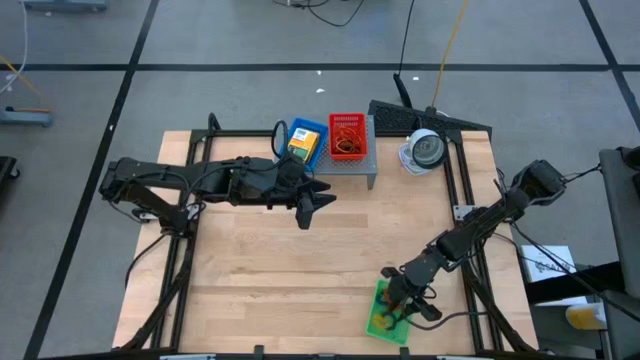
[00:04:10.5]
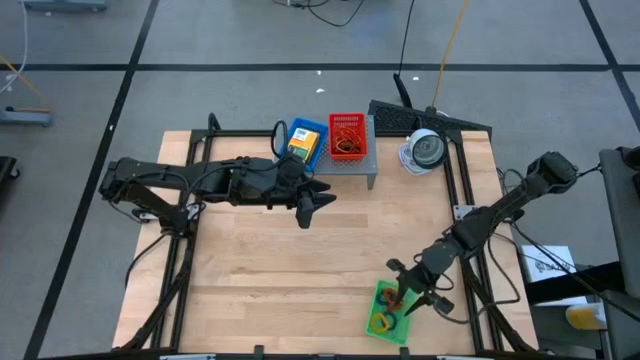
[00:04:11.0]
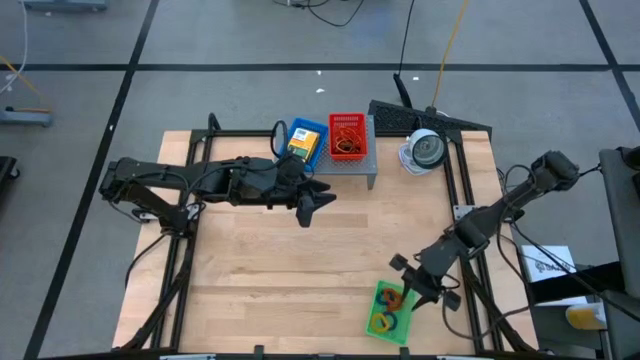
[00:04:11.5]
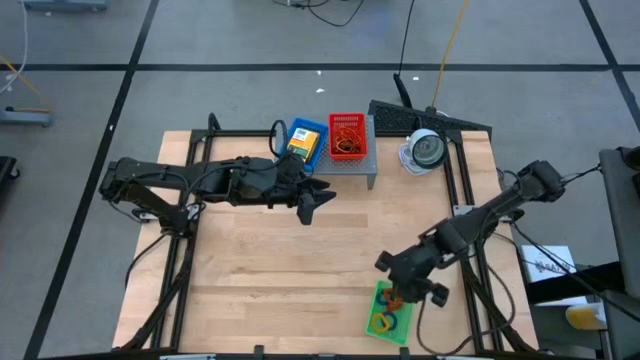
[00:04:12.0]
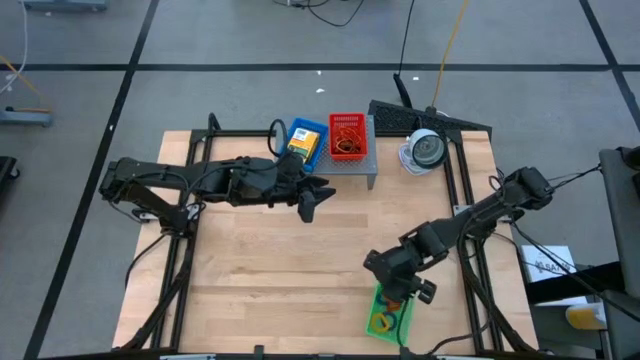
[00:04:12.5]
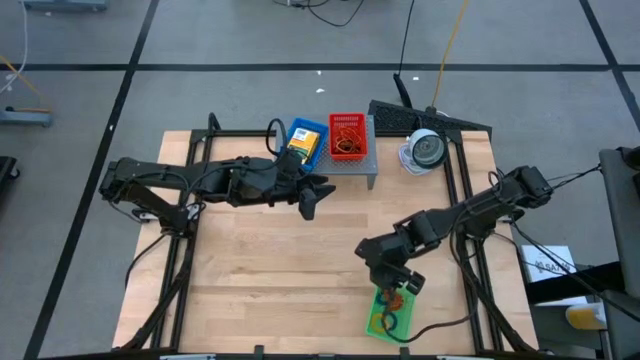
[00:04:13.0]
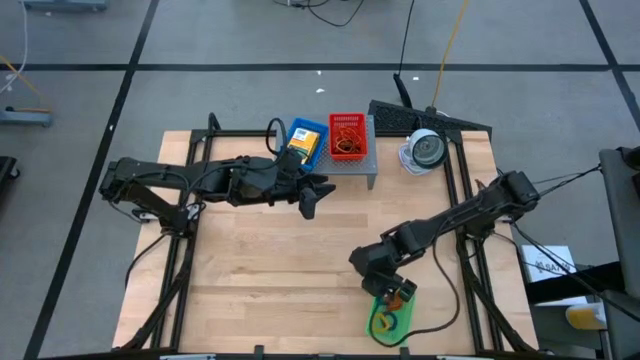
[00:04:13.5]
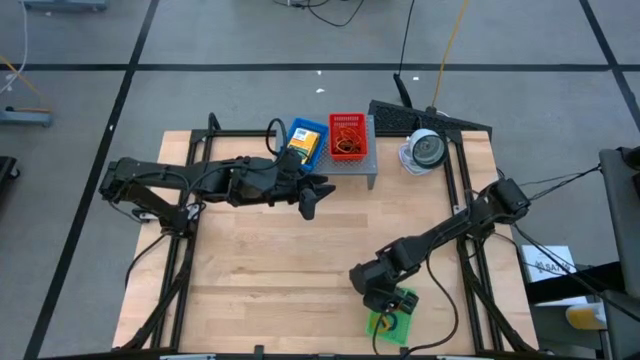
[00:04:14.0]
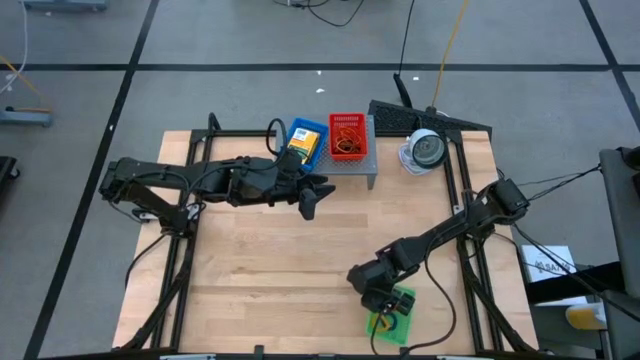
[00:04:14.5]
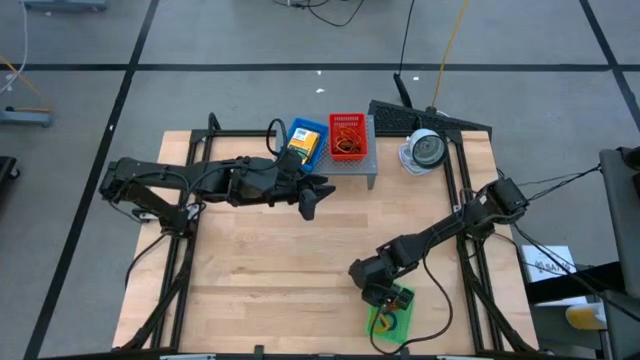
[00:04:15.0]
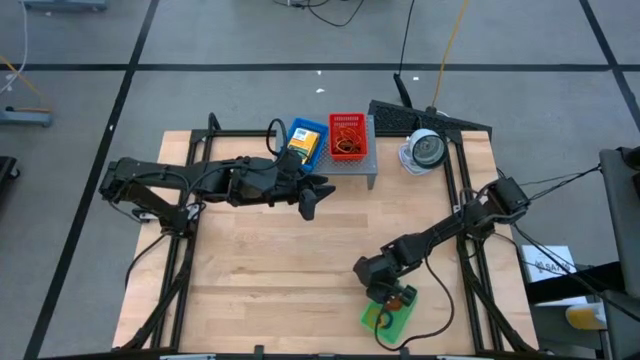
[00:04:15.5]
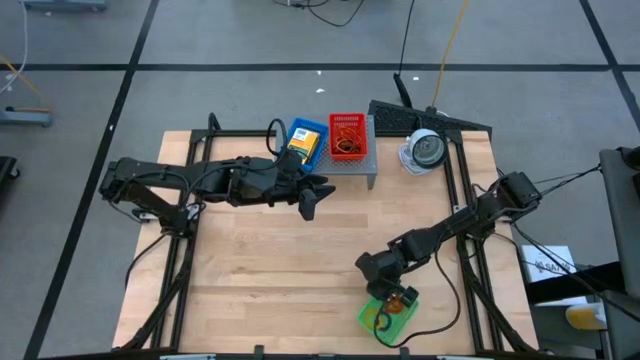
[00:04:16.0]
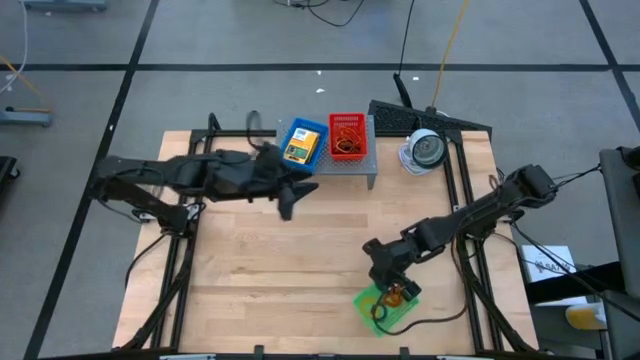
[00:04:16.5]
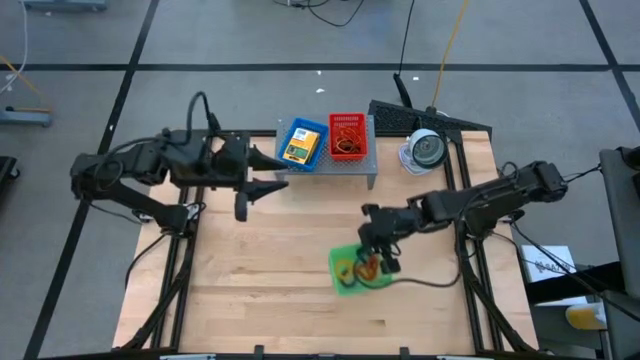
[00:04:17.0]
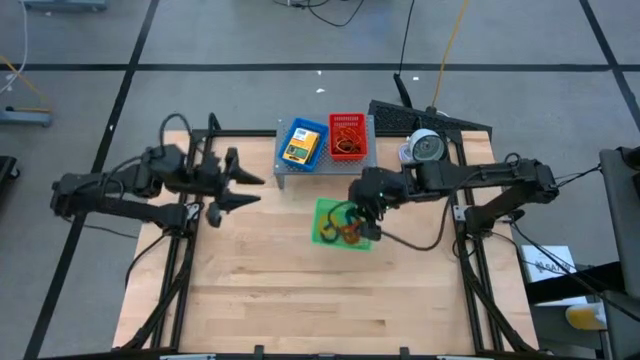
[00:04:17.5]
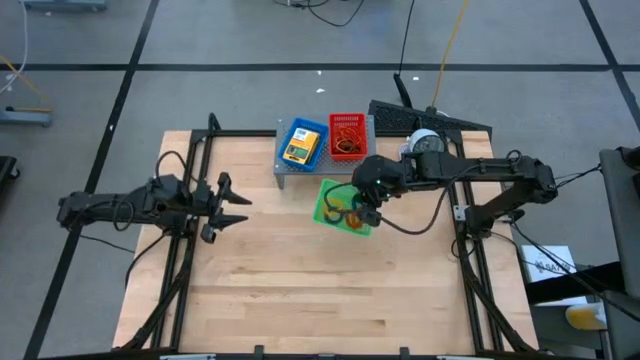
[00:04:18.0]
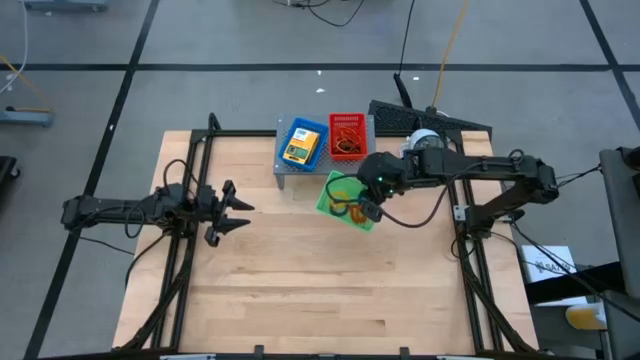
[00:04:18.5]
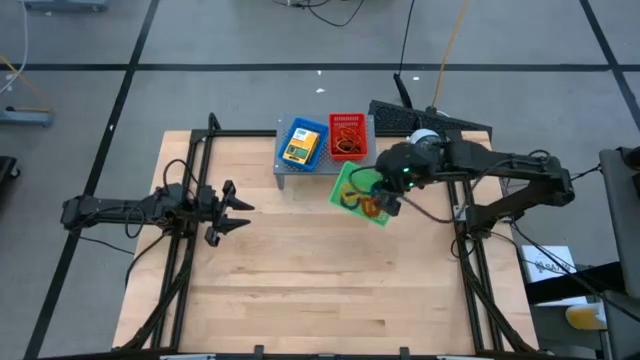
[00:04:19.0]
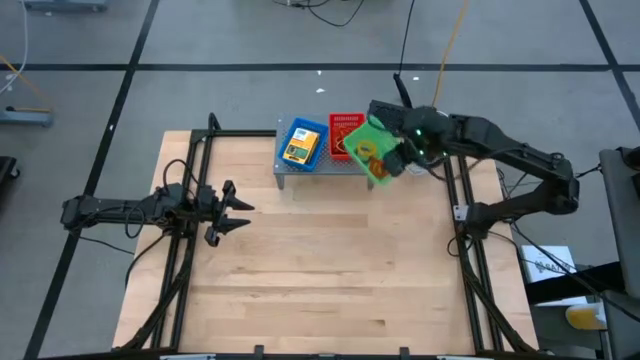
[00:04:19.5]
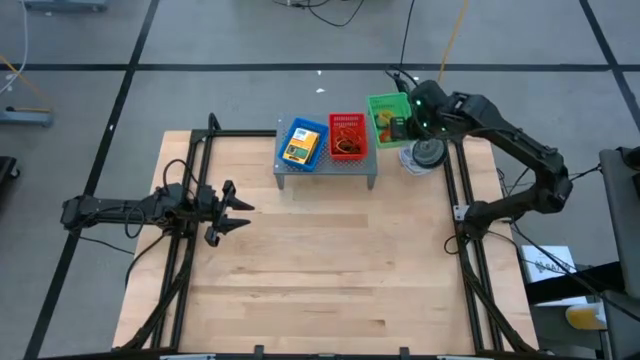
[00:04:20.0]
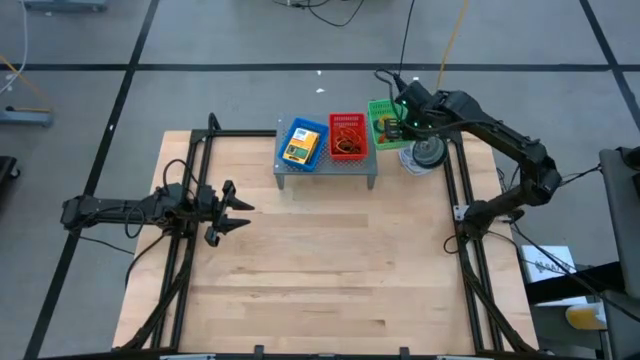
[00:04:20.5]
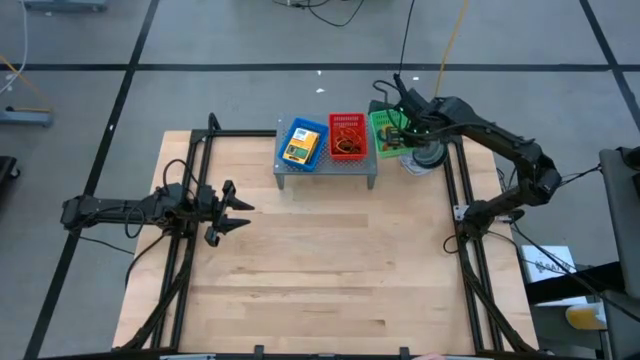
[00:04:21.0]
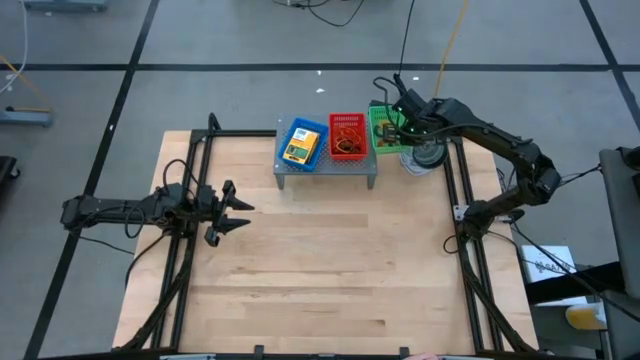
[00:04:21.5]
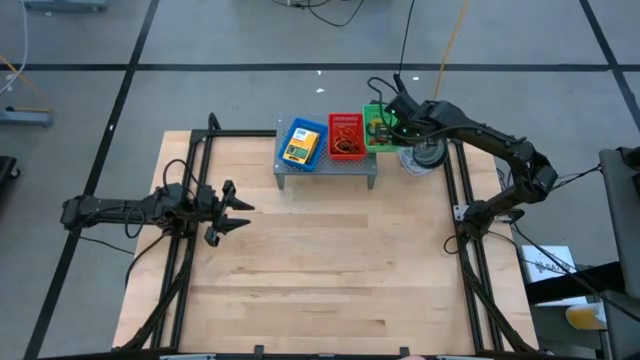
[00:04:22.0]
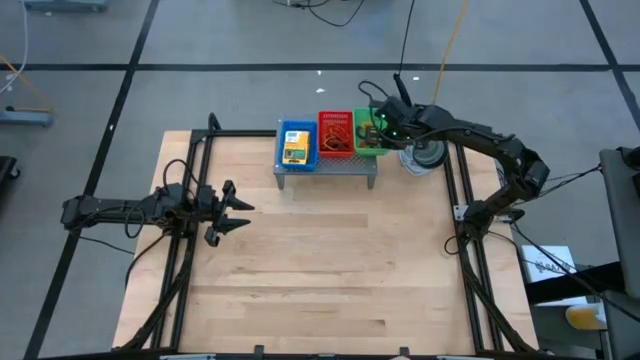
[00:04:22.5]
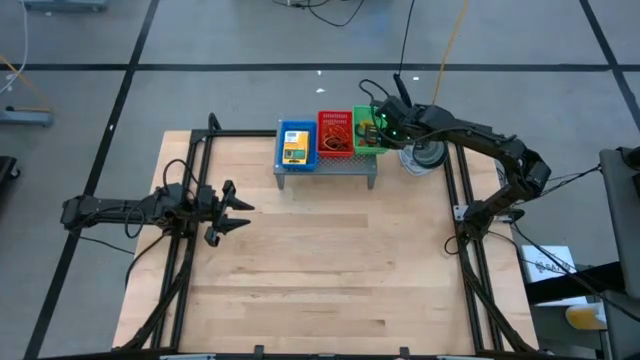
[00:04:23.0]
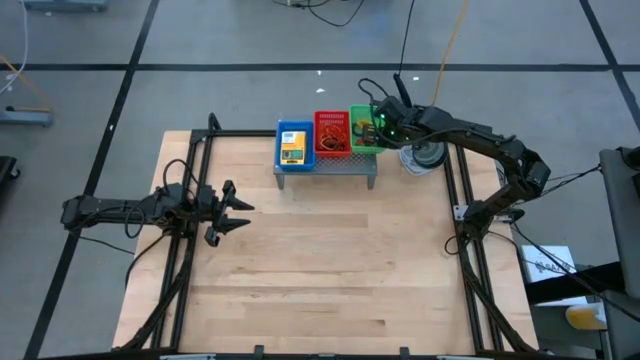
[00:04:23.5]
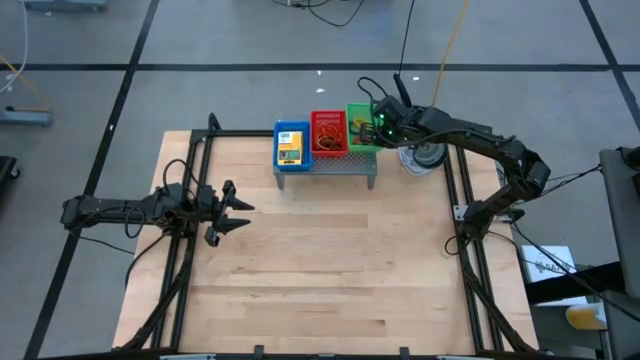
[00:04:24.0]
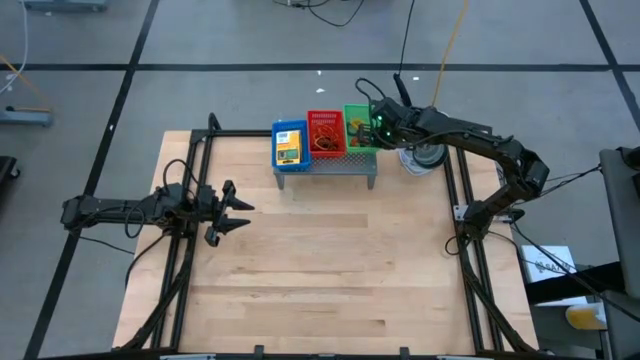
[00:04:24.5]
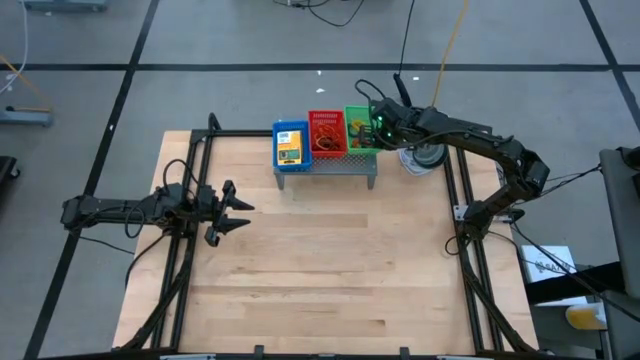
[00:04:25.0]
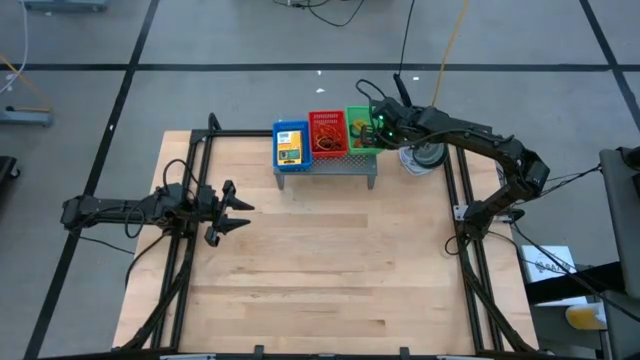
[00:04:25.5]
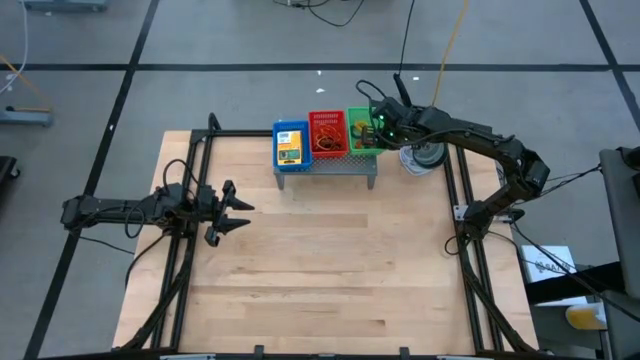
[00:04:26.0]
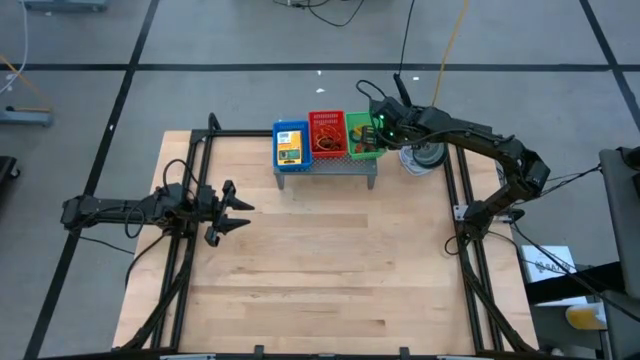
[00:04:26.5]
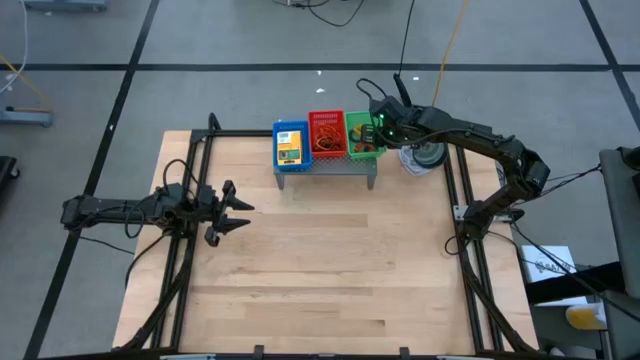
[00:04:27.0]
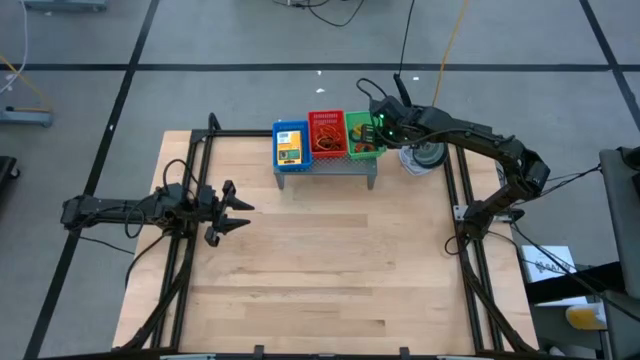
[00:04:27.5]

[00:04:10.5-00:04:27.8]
Task: Pick & Place Office Desk Supplies
Put the green bin on the shelf

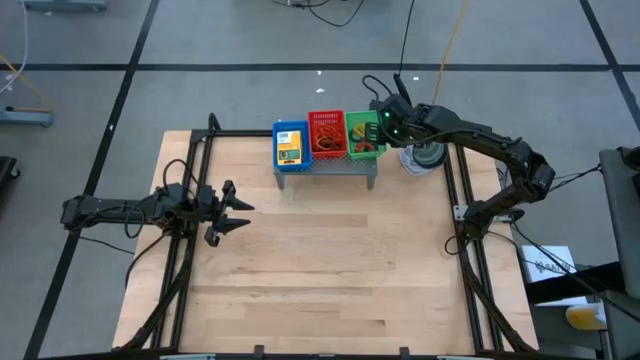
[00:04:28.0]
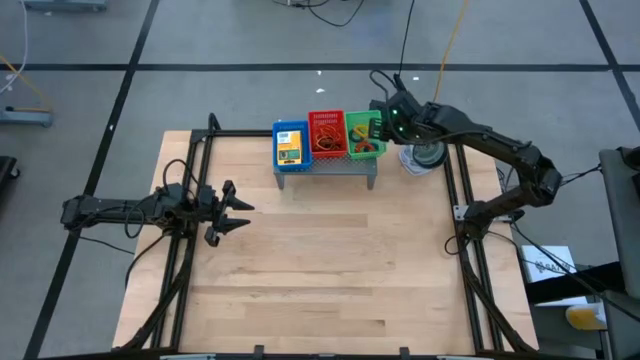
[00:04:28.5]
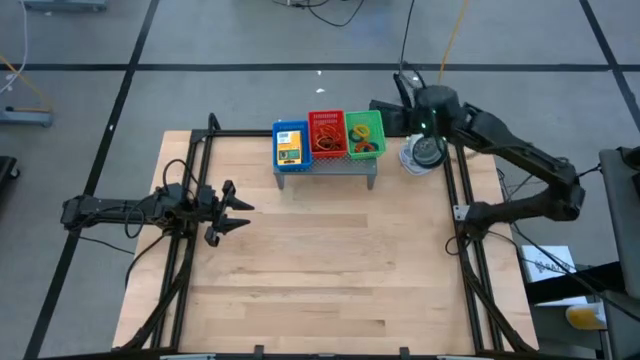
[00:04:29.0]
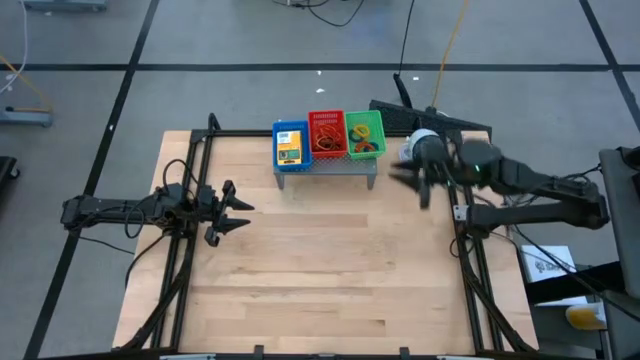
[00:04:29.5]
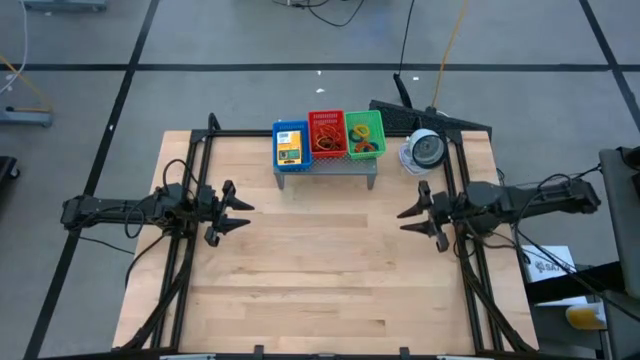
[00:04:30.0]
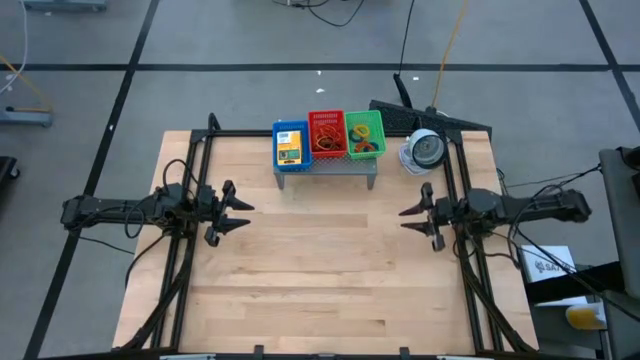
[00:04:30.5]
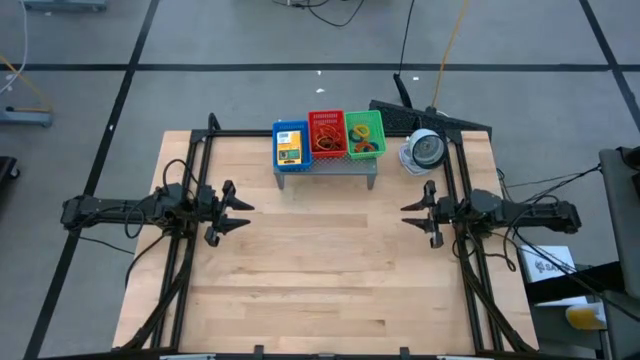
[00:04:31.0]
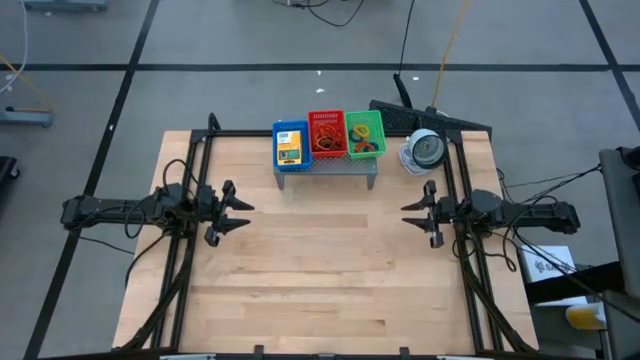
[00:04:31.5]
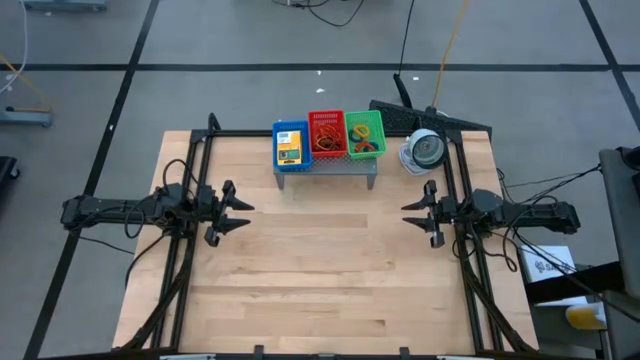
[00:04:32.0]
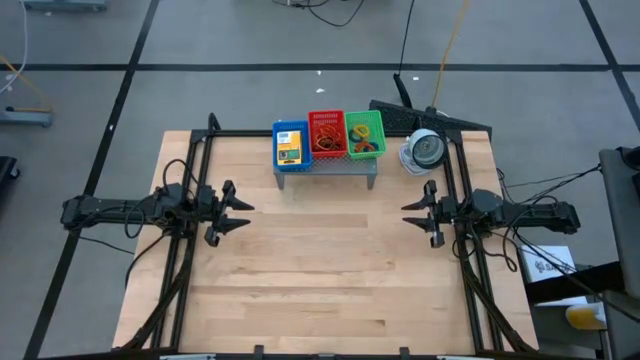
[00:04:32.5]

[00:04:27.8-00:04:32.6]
Return to Home Position
